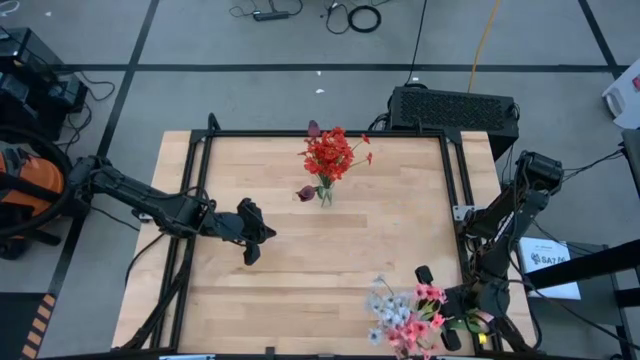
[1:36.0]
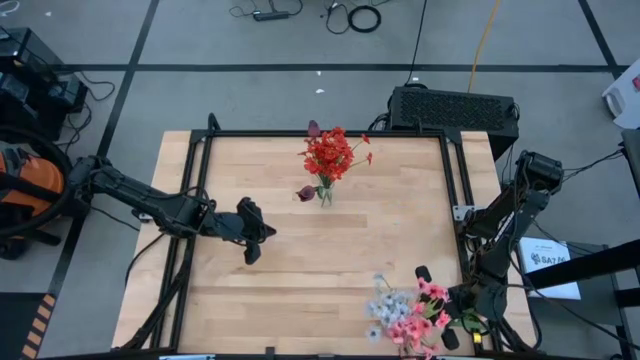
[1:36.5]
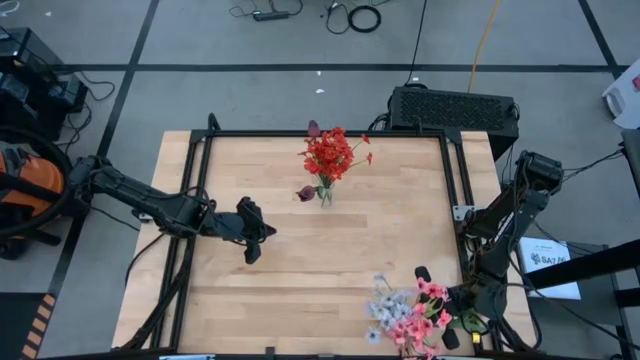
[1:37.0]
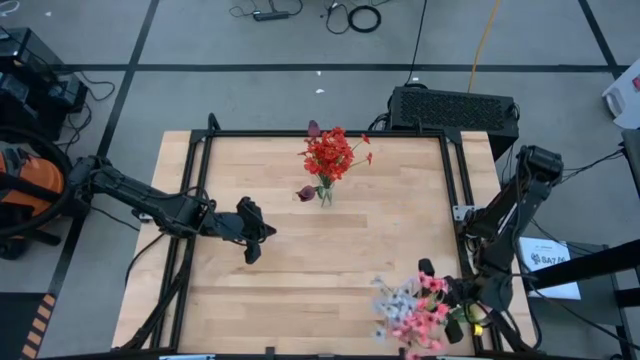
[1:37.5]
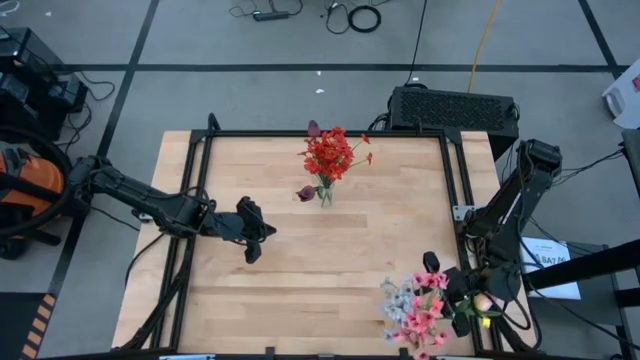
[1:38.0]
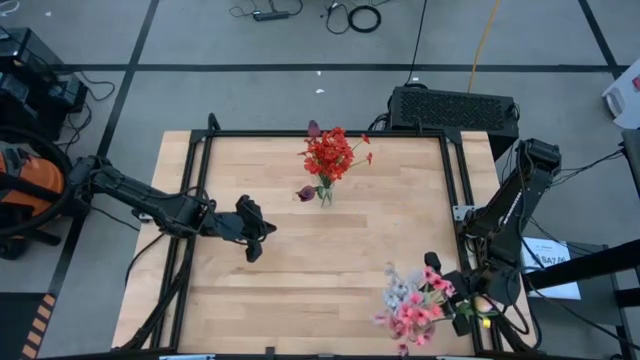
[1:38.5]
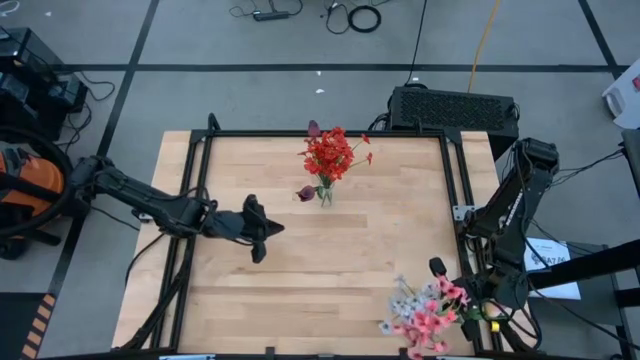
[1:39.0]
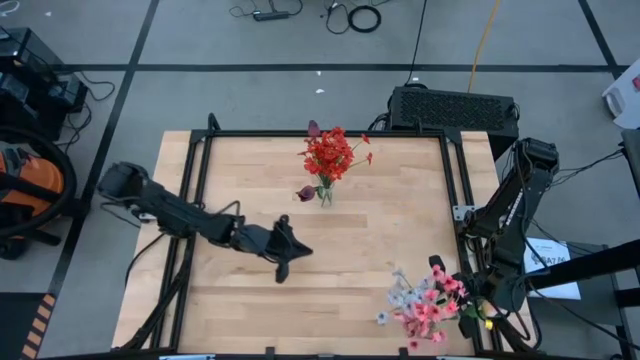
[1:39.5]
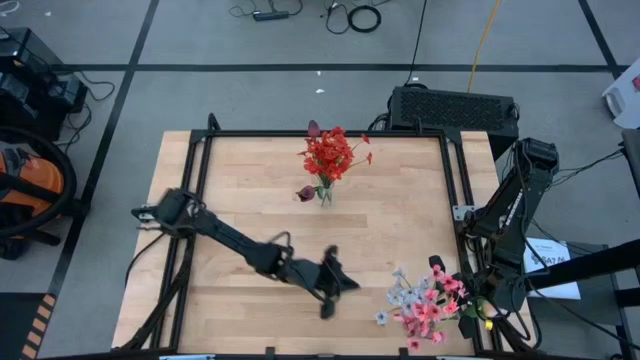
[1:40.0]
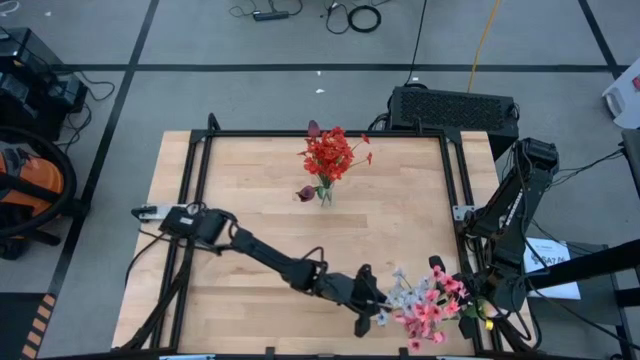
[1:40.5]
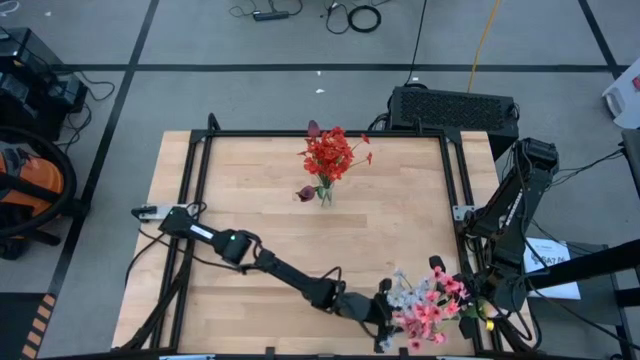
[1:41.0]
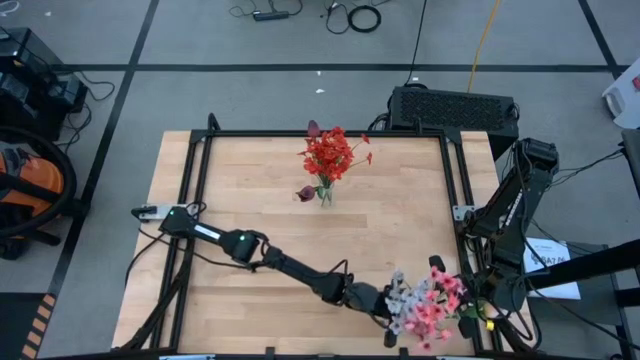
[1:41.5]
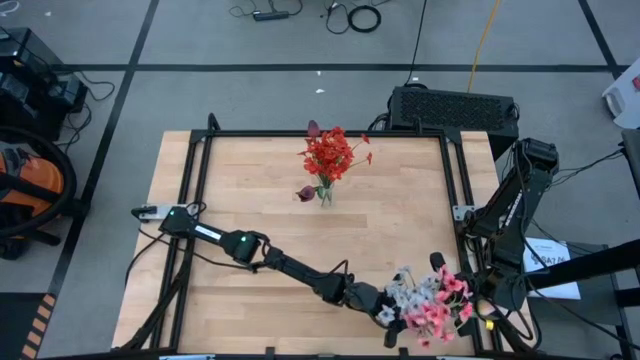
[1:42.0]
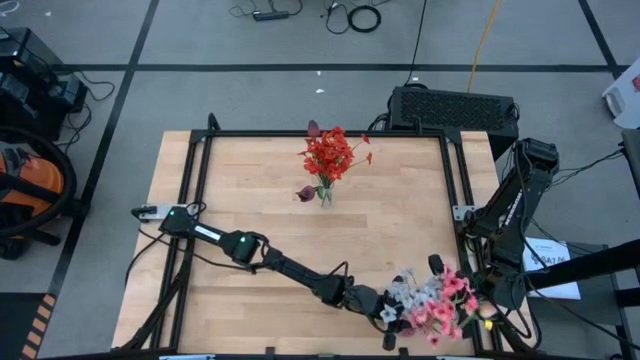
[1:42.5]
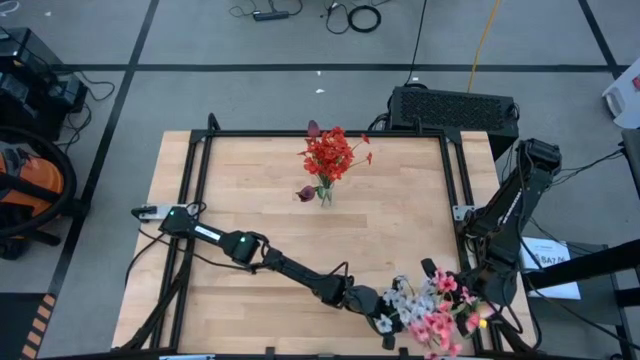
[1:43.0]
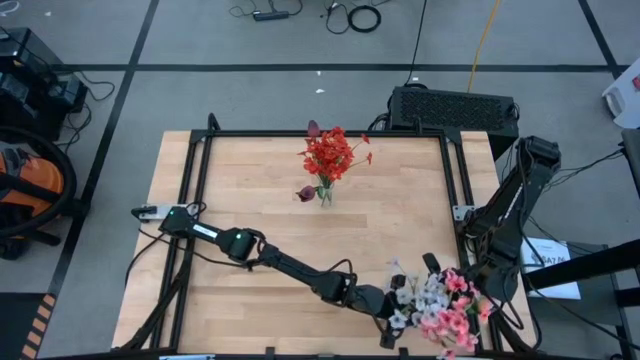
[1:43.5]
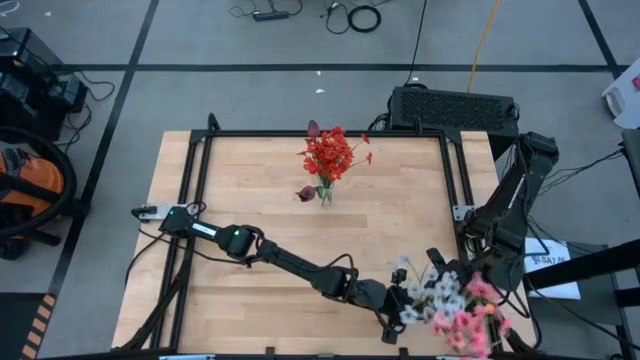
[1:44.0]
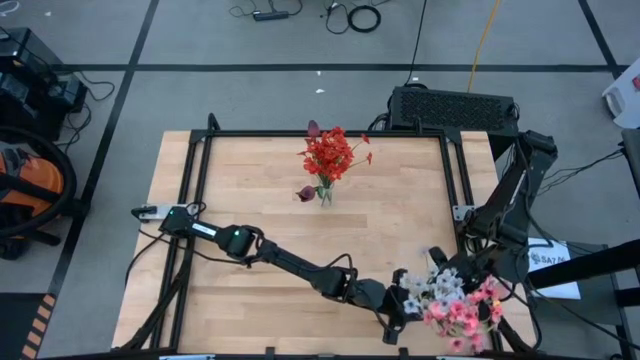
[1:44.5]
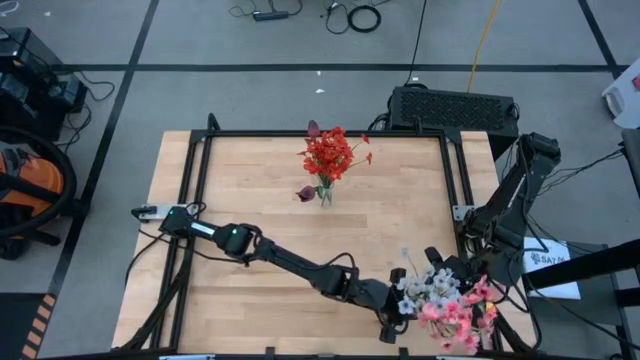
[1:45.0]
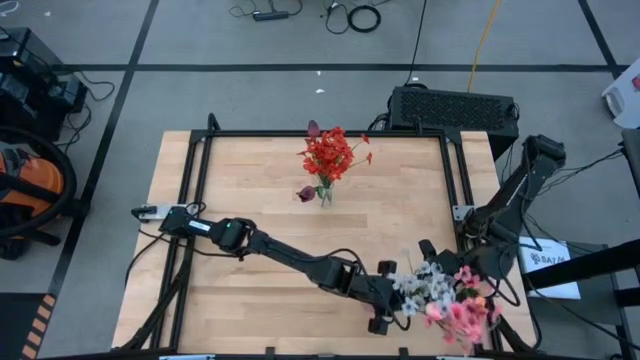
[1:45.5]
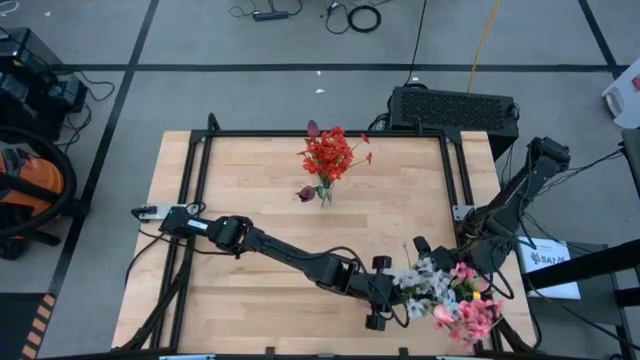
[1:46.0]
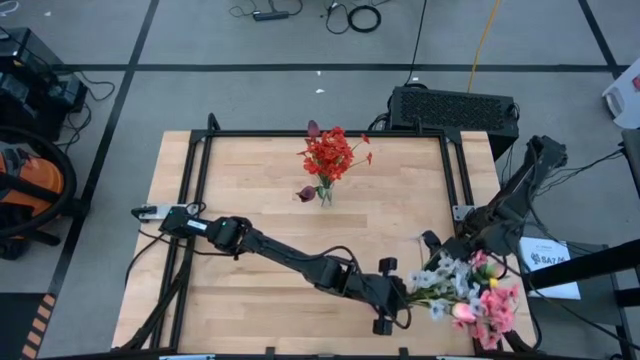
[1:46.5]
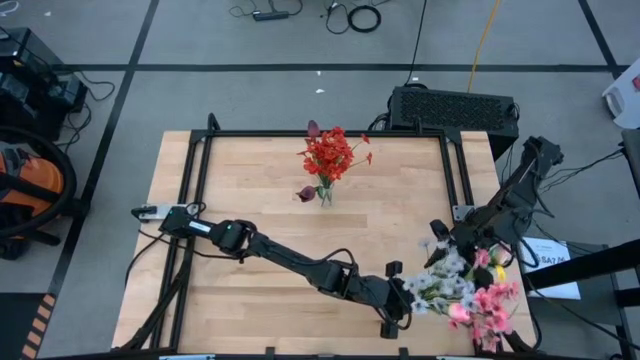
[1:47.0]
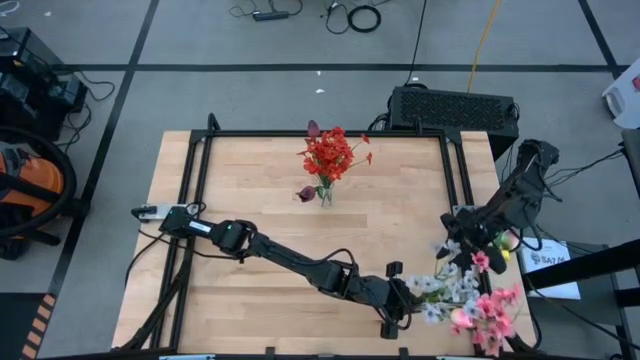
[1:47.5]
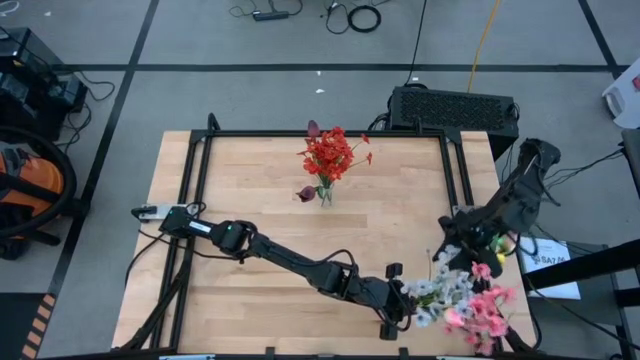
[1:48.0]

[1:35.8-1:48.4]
Task: Sort flowers into vase by color
Put the white flower in the purple vase

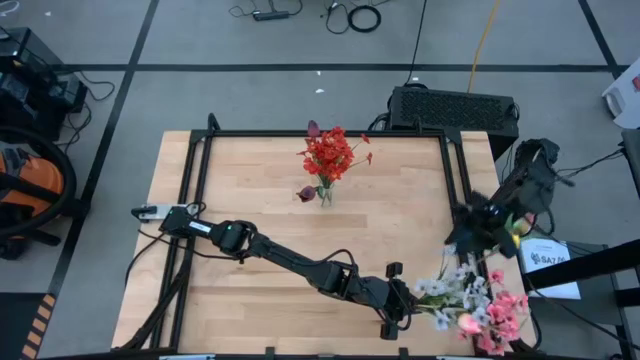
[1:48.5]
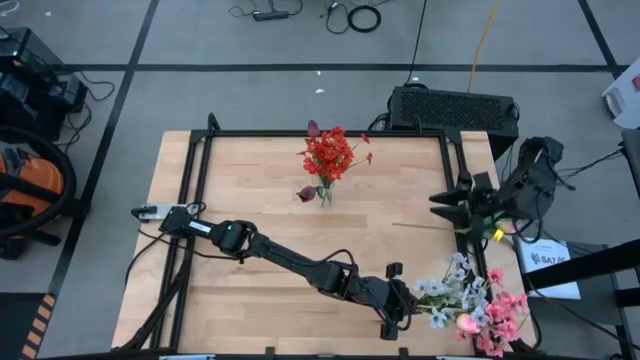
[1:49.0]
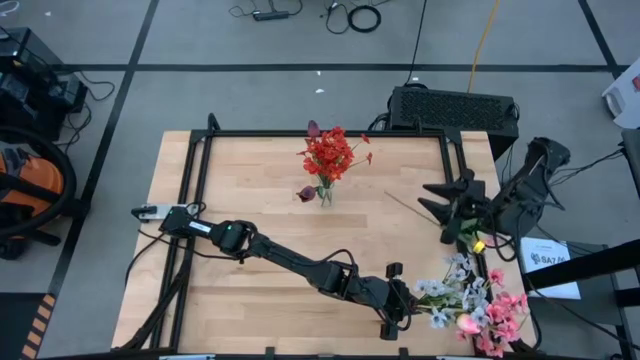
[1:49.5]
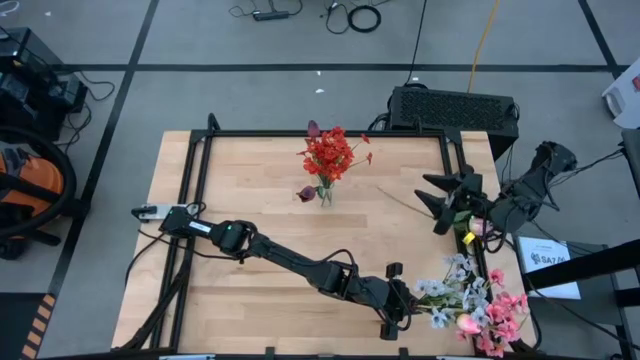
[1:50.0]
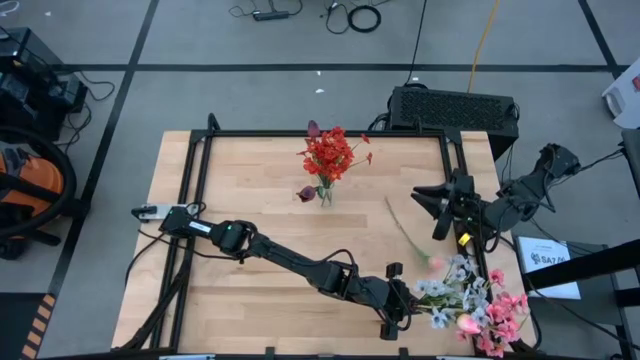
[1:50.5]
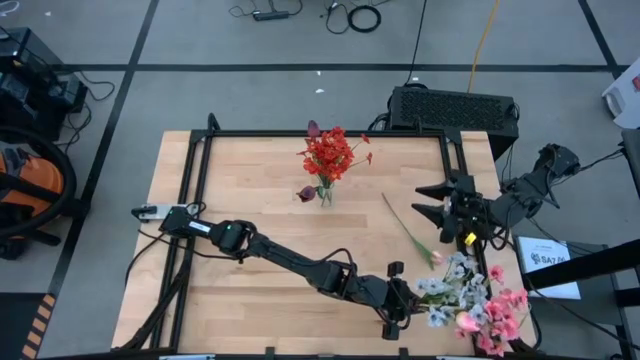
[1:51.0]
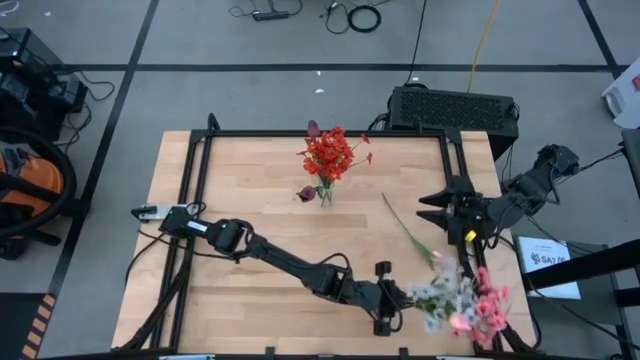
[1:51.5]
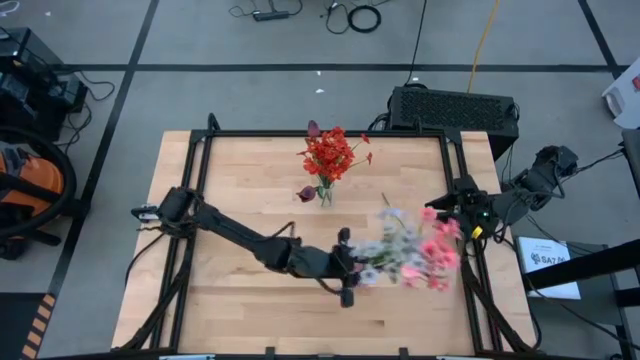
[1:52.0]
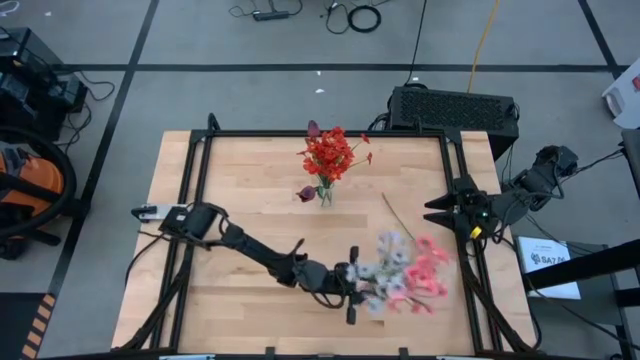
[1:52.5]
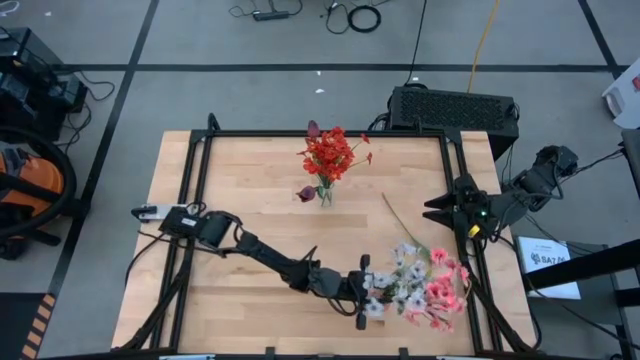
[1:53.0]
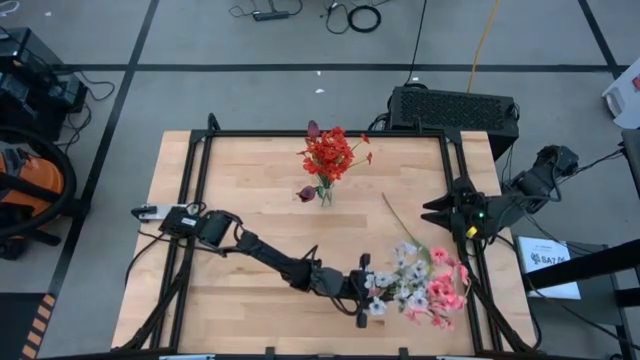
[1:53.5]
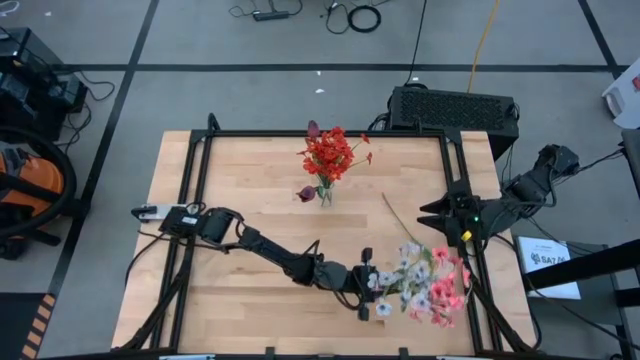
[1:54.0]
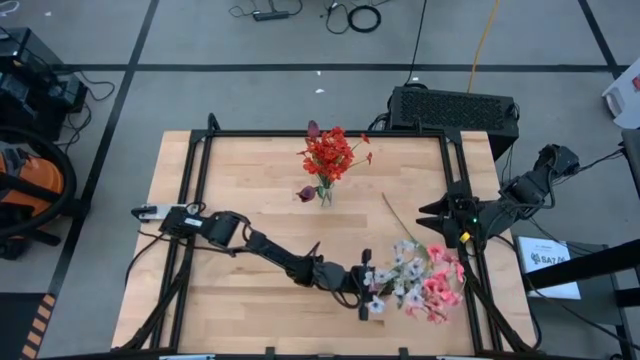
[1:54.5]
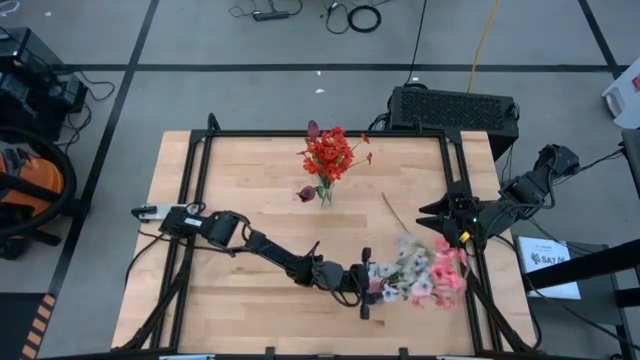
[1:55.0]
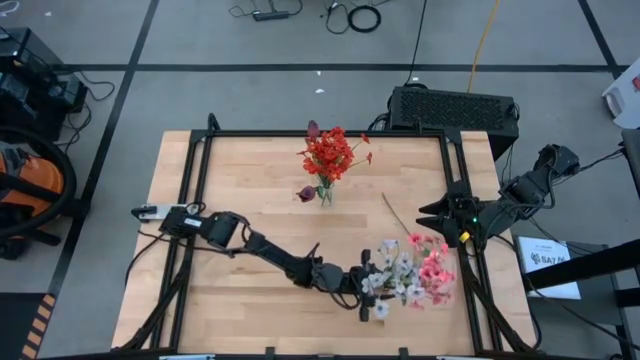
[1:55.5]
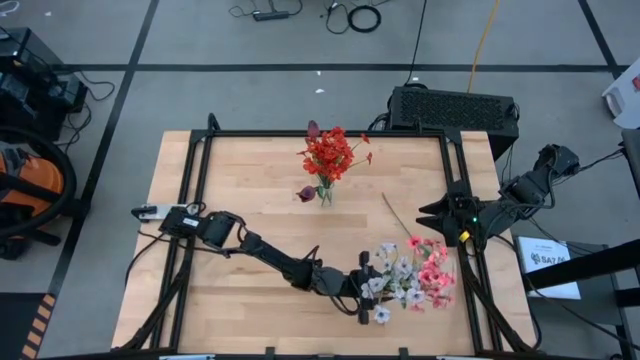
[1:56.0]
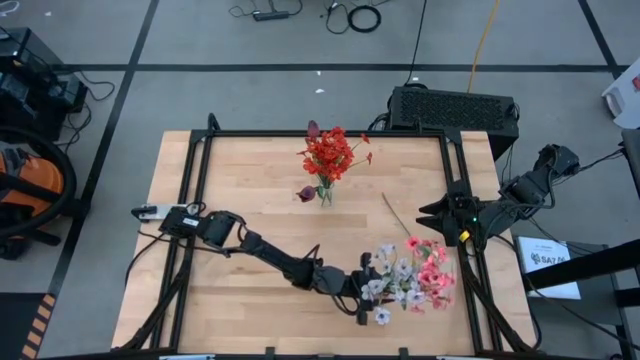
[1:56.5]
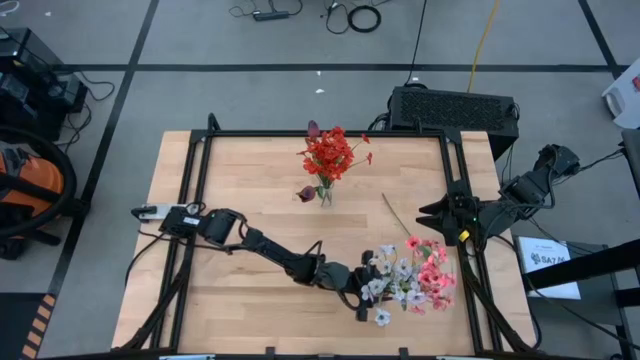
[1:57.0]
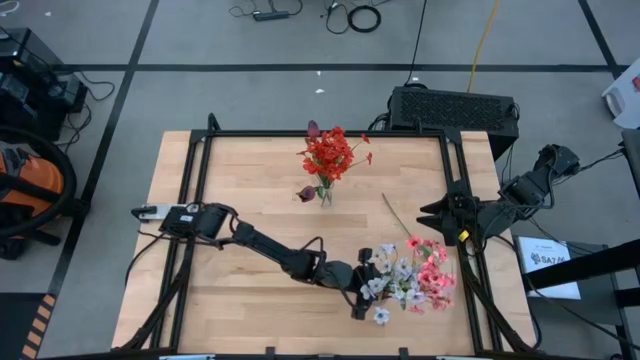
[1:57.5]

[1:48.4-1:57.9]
Adjust the purple vase
